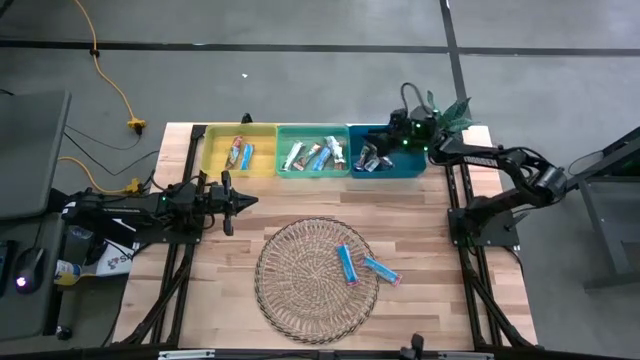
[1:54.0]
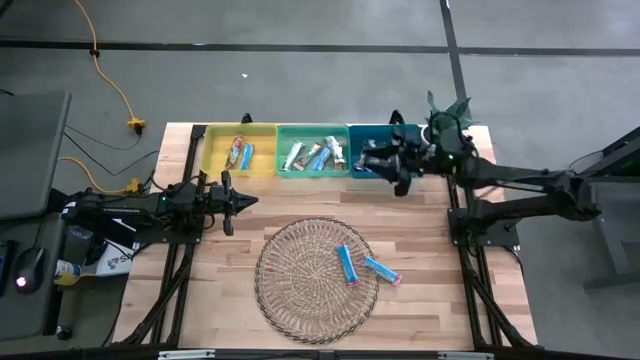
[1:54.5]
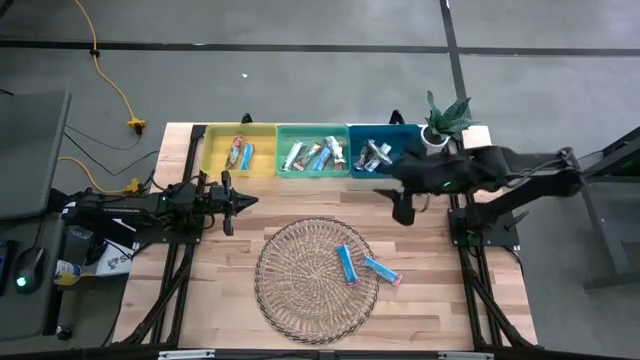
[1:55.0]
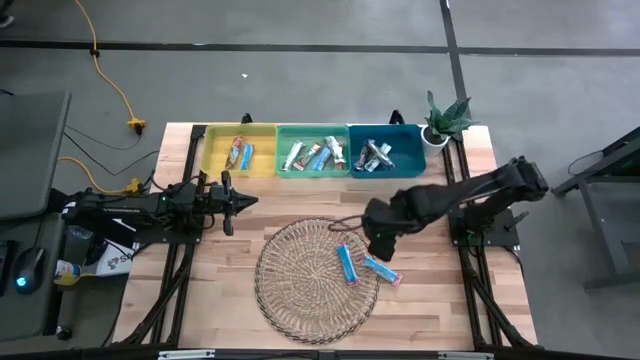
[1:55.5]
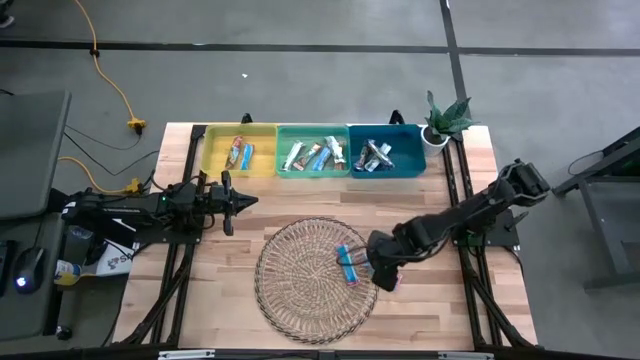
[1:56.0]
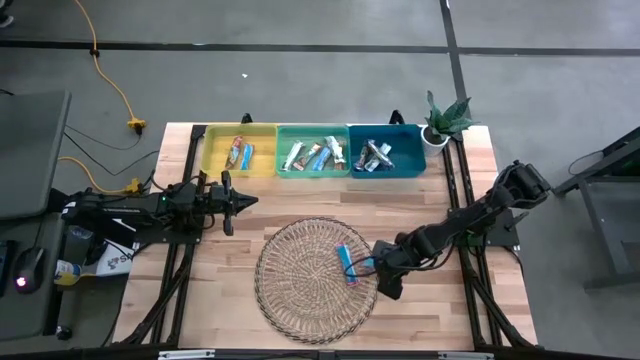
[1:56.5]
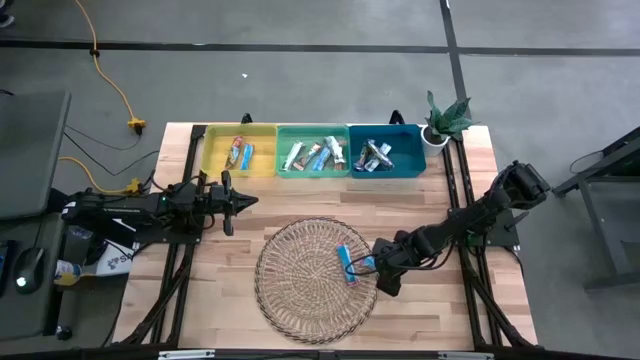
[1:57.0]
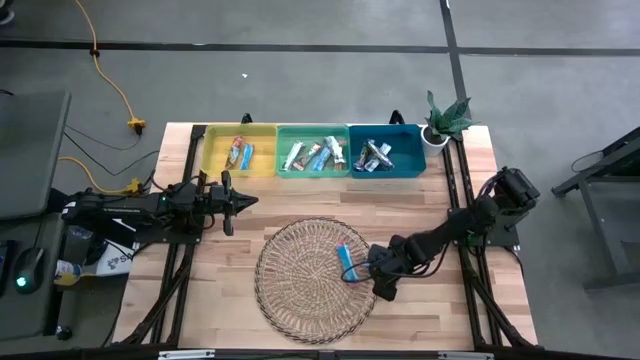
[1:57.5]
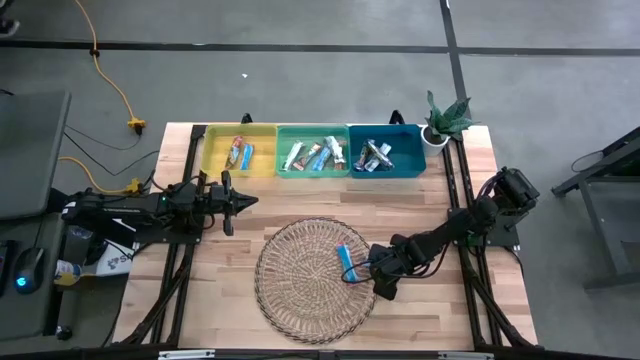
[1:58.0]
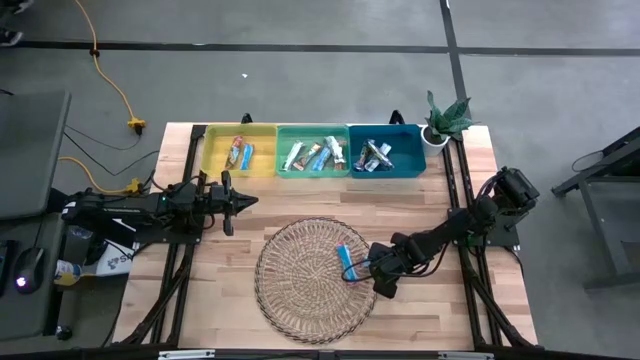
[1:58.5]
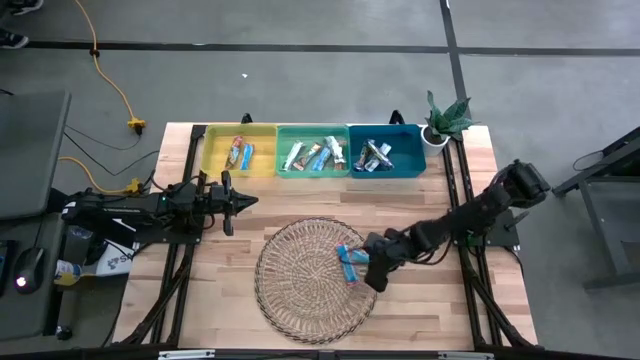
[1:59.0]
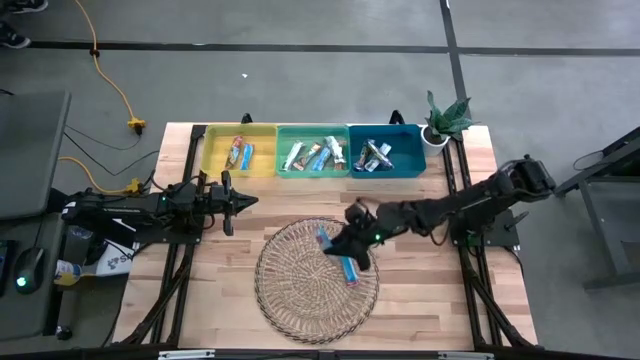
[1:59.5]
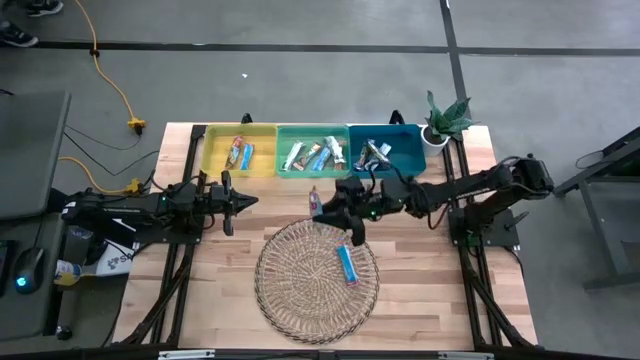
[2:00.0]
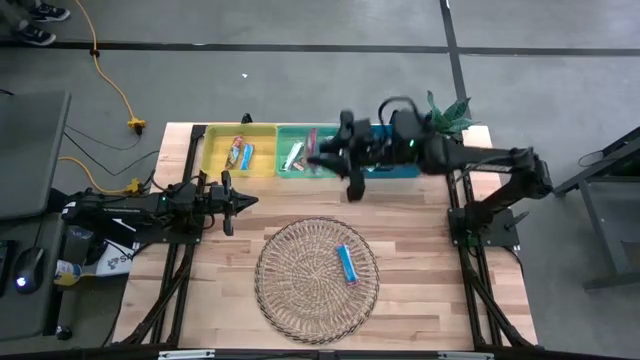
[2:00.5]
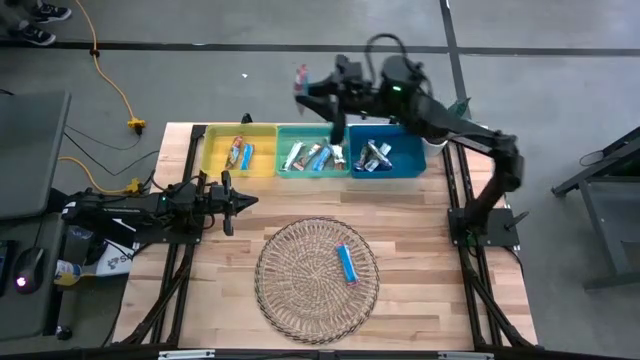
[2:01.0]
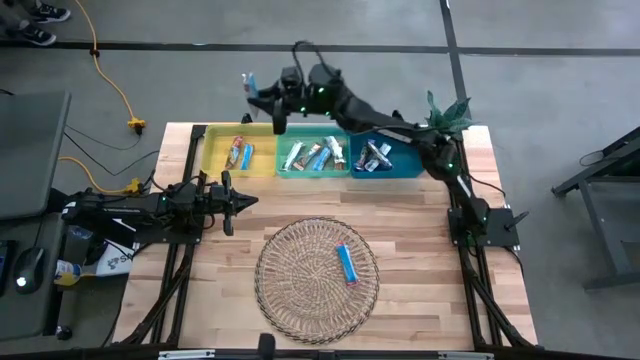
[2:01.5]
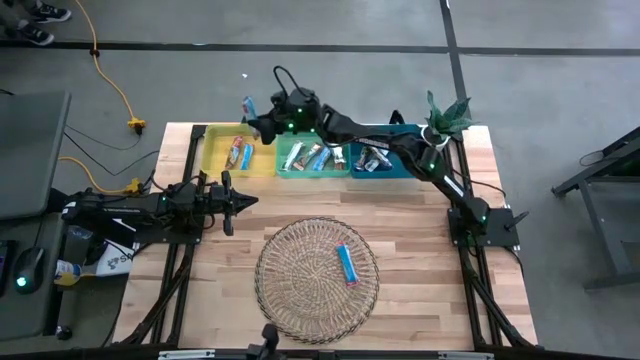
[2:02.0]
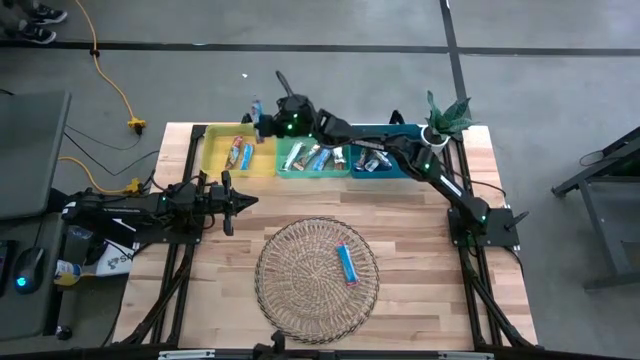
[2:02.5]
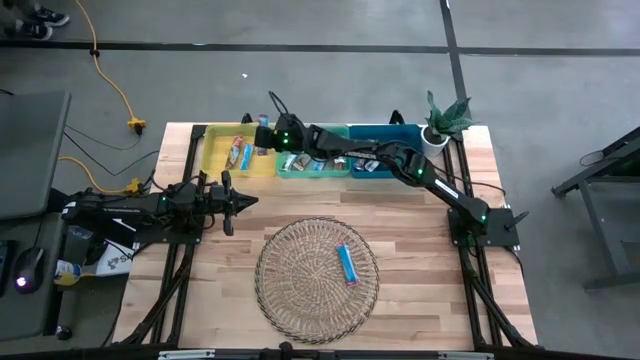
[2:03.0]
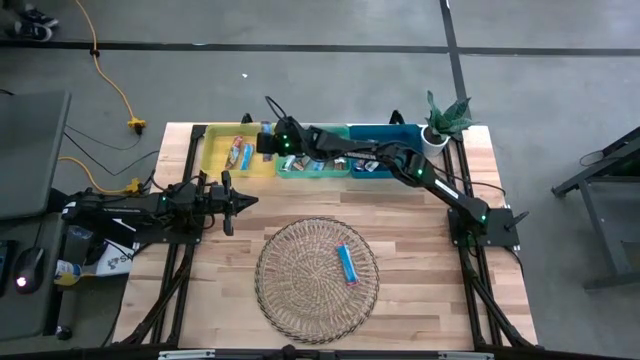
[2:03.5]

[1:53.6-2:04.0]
Task: Pick and place Granola Bars by type
Put the red granola bar into the yellow bin

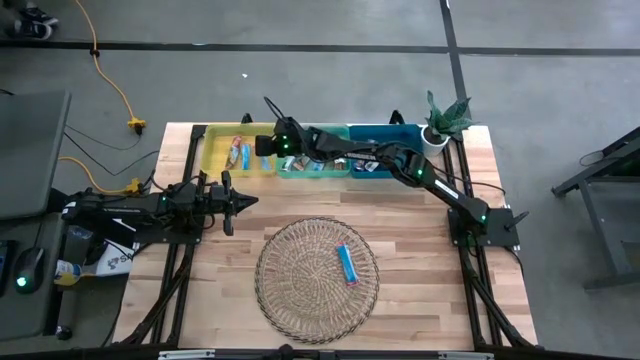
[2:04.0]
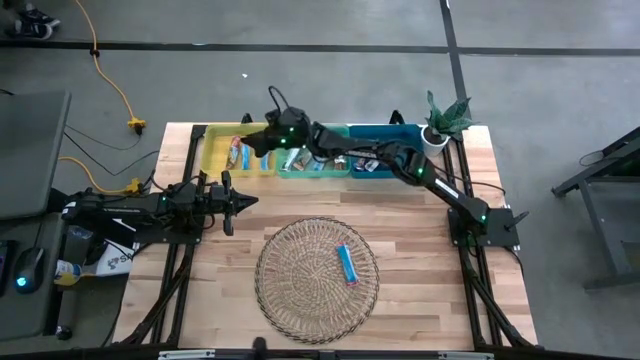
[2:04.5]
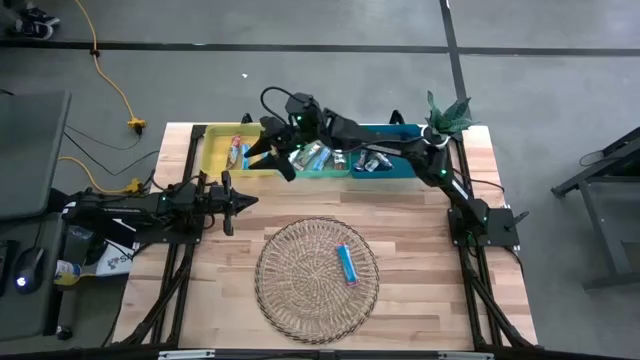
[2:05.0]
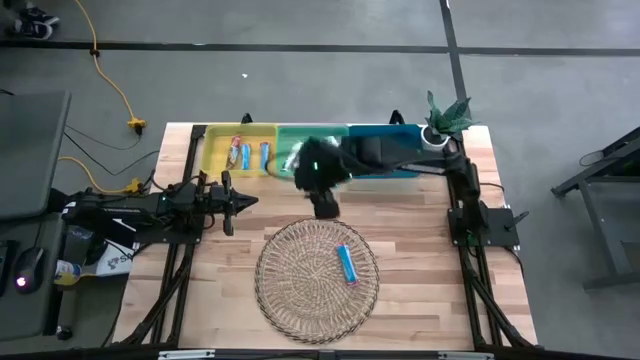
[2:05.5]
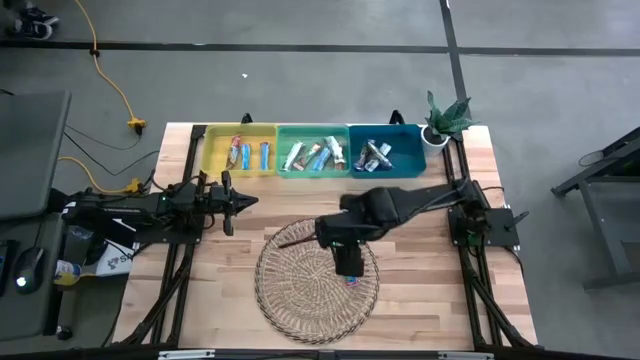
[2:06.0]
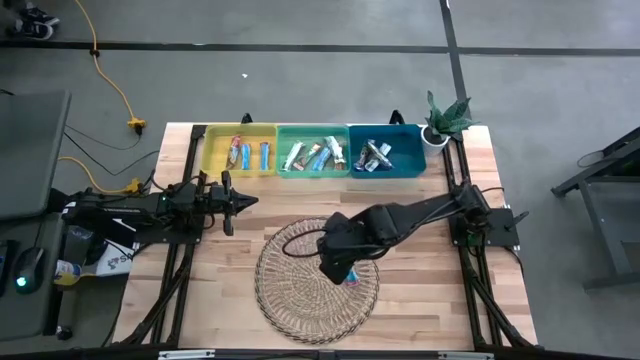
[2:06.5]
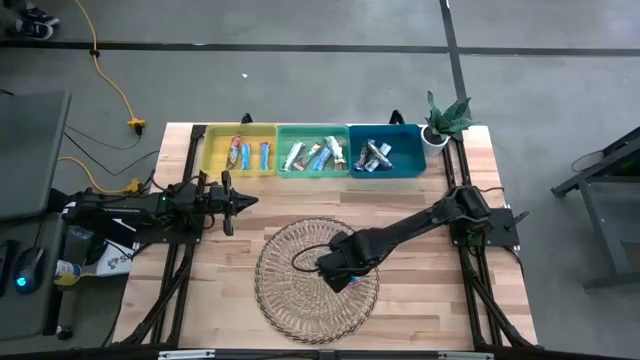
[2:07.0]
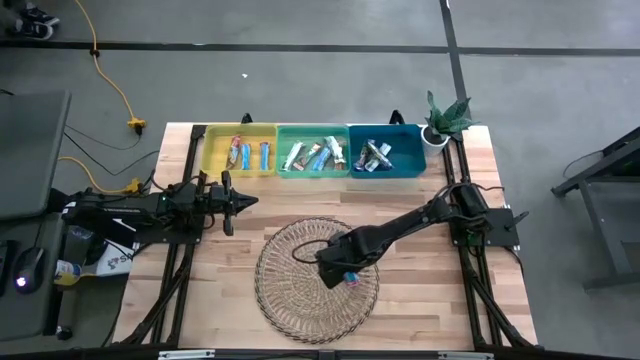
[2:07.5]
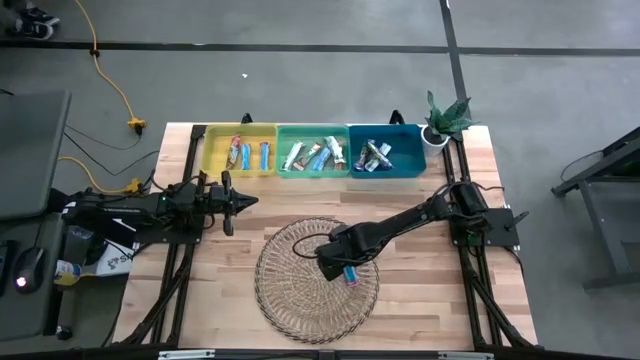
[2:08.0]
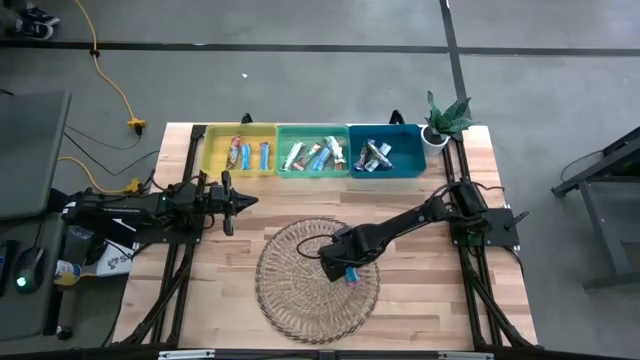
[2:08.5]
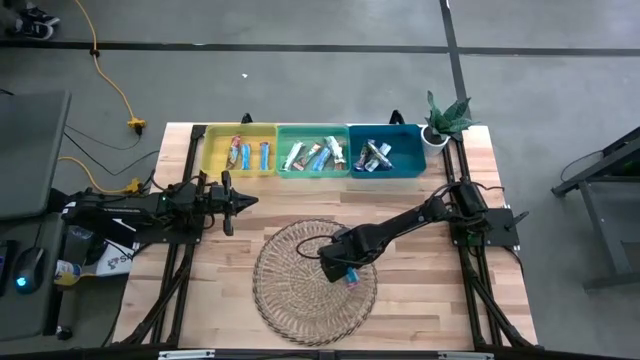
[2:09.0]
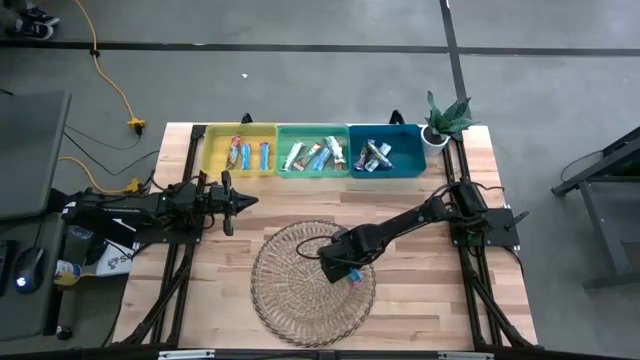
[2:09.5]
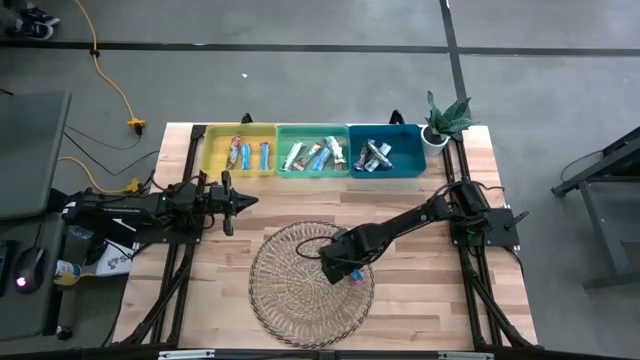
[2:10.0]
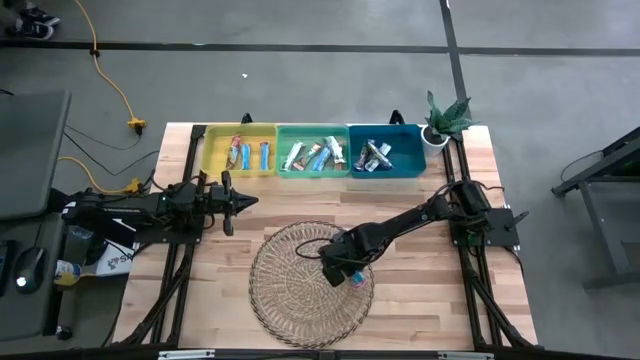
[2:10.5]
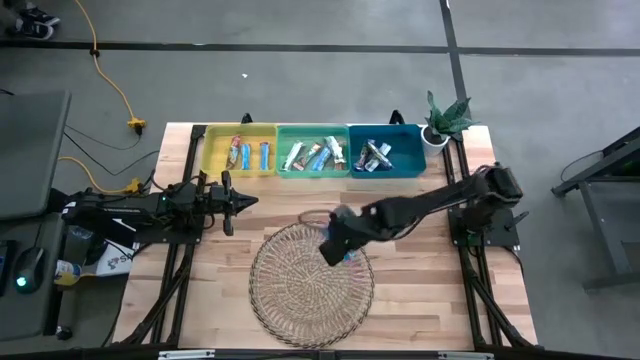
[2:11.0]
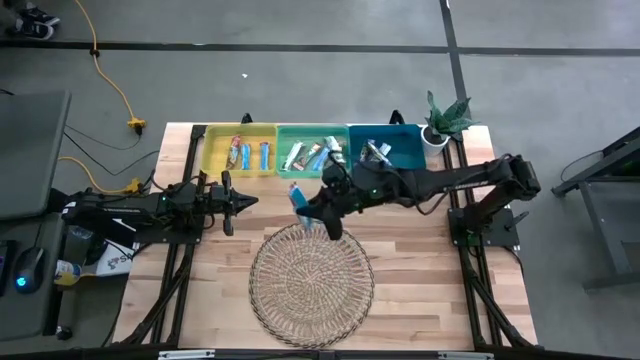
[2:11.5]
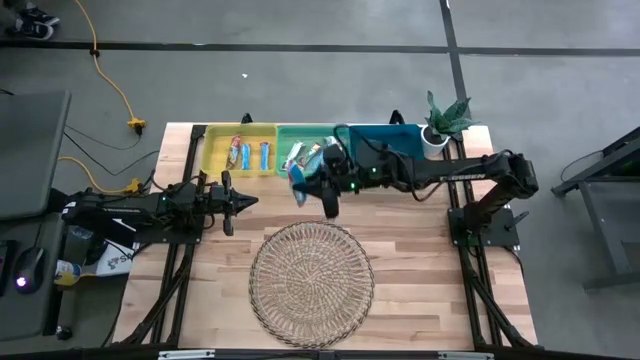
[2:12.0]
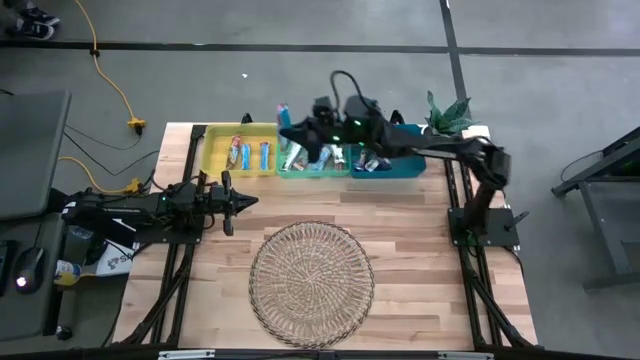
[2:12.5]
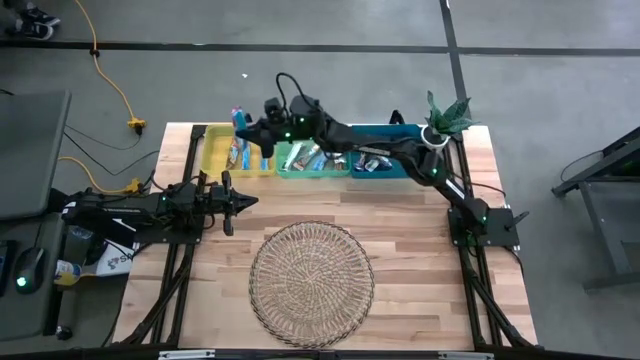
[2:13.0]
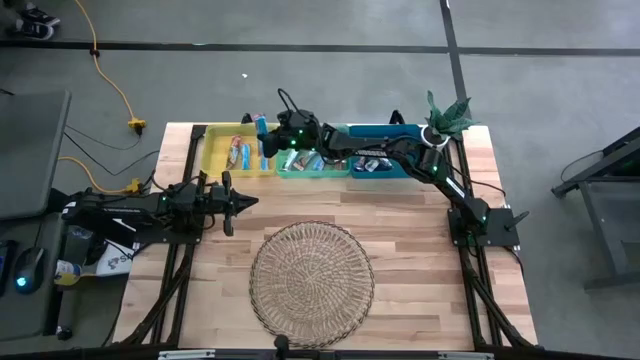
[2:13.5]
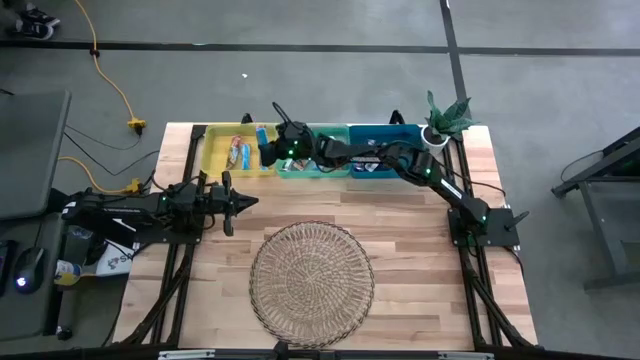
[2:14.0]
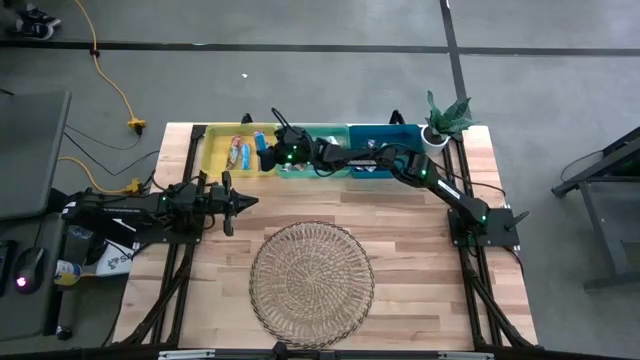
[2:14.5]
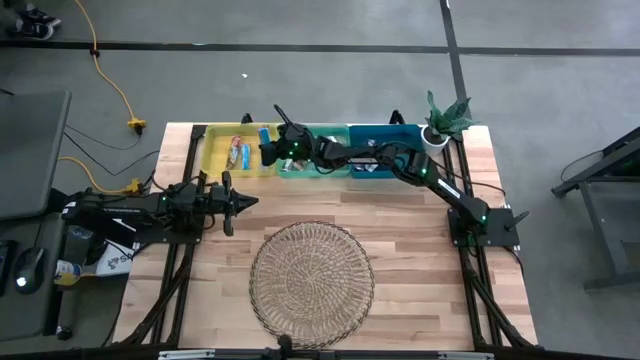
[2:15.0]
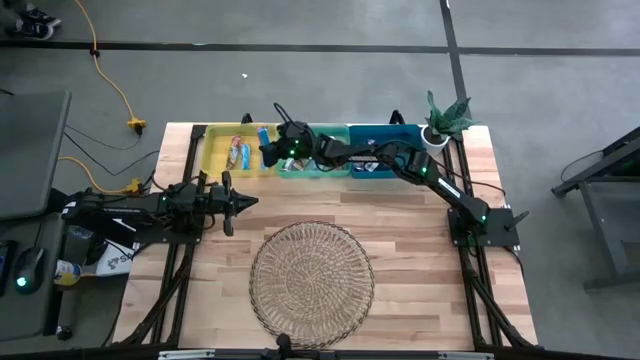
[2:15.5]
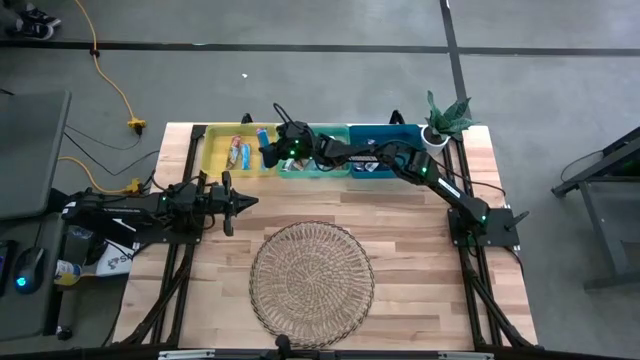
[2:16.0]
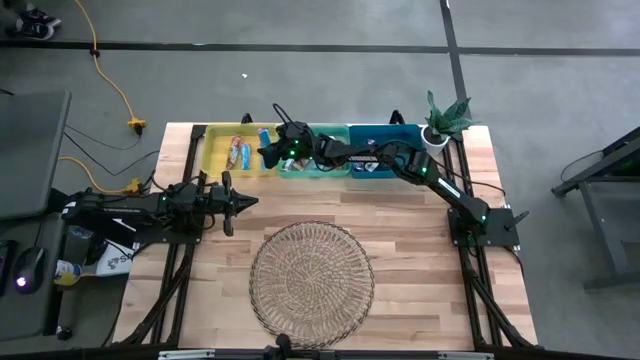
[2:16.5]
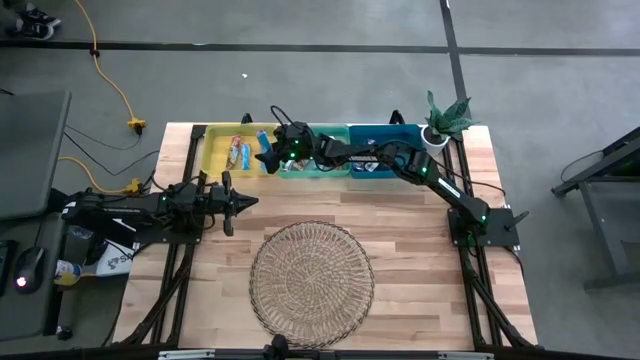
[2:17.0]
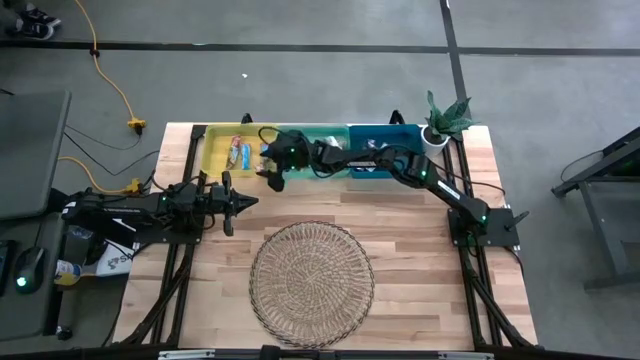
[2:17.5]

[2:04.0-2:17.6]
Put the red granola bar into the yellow bin
